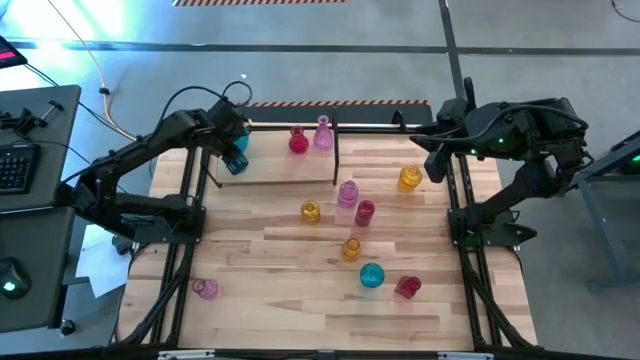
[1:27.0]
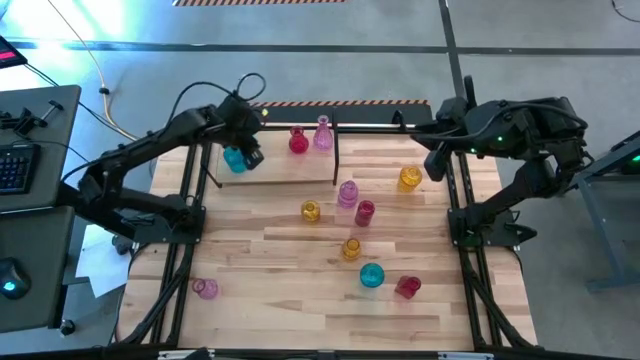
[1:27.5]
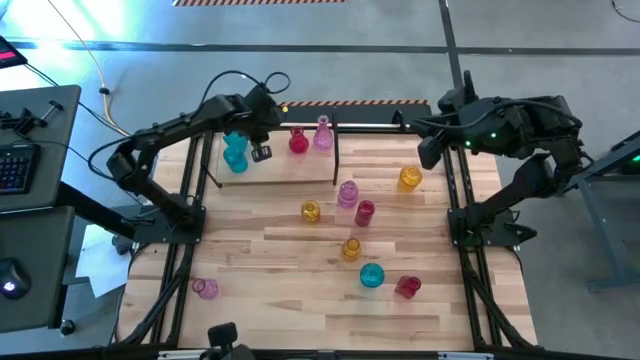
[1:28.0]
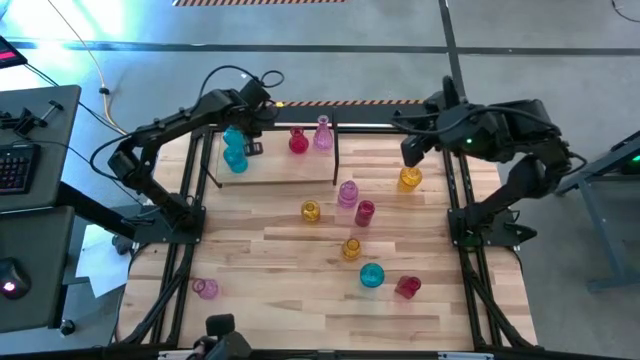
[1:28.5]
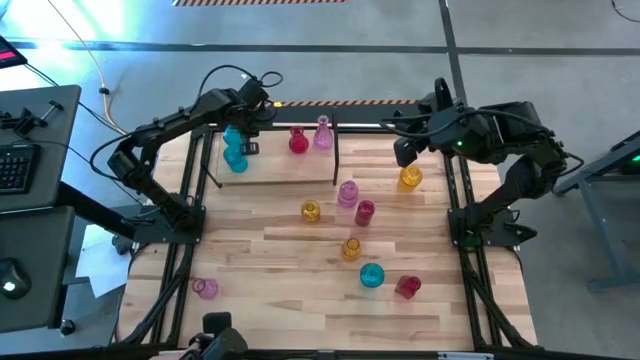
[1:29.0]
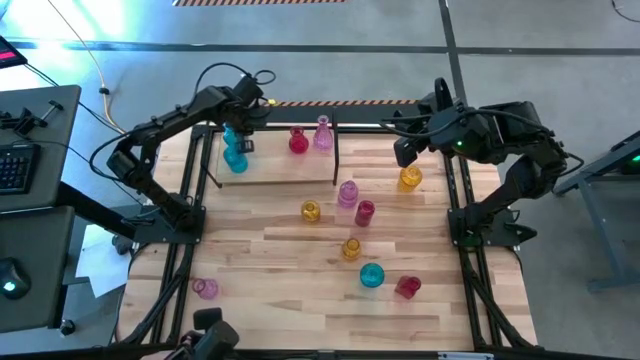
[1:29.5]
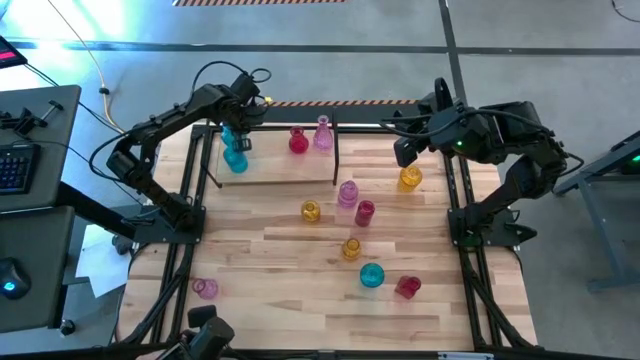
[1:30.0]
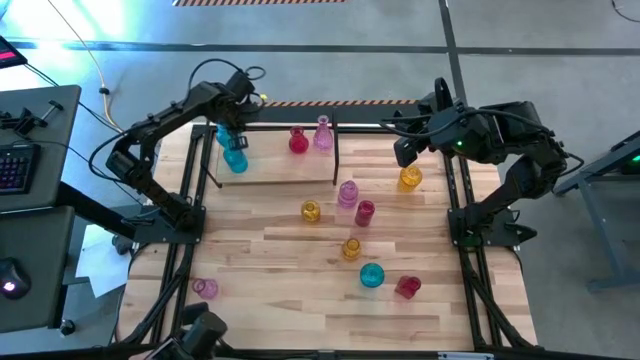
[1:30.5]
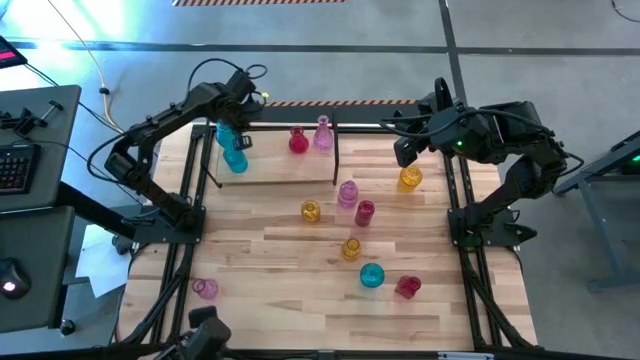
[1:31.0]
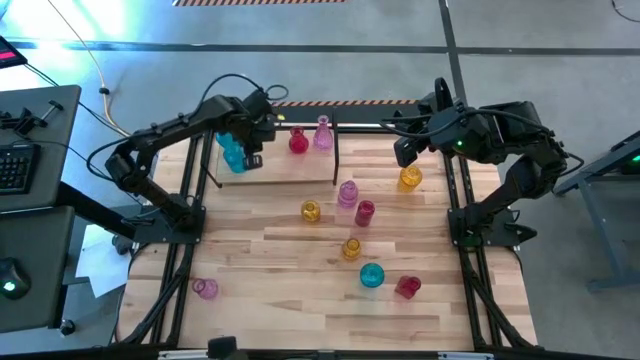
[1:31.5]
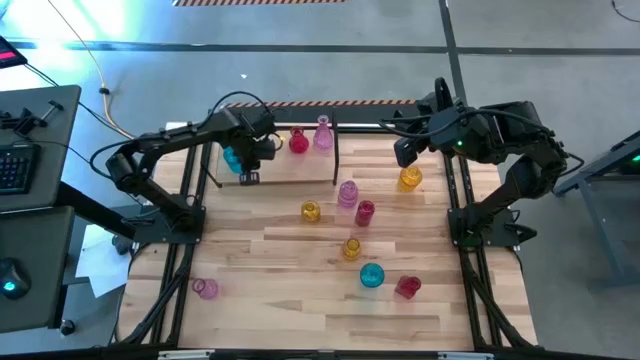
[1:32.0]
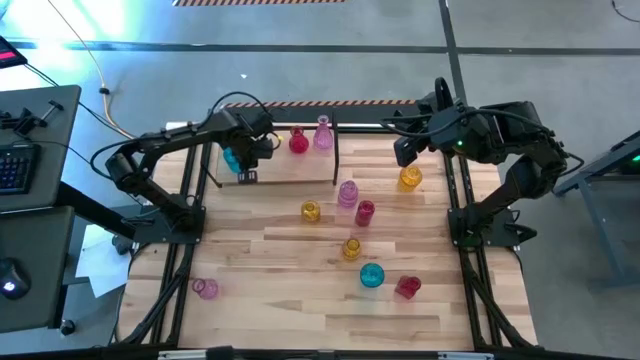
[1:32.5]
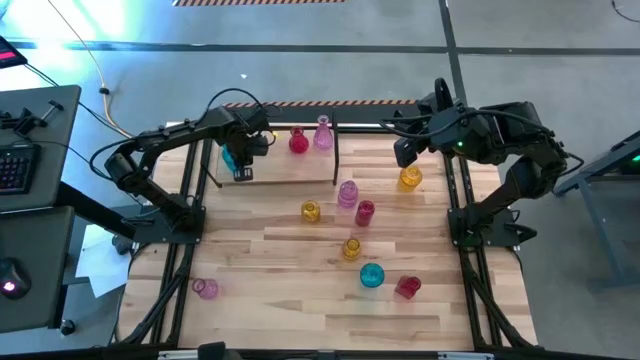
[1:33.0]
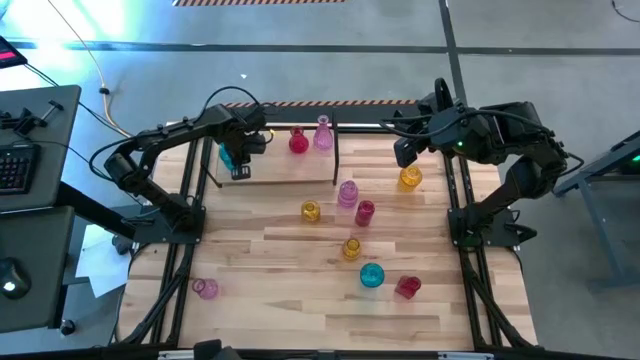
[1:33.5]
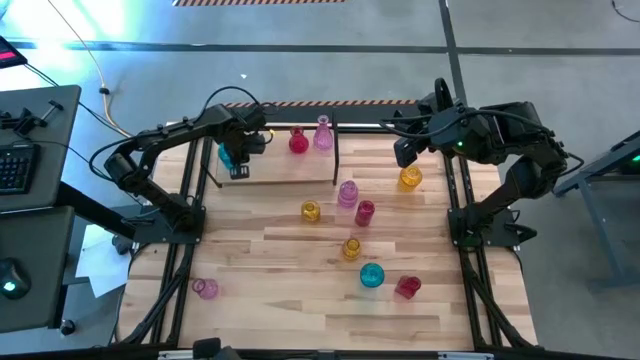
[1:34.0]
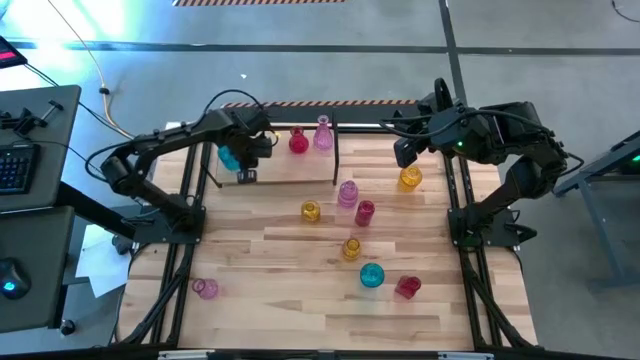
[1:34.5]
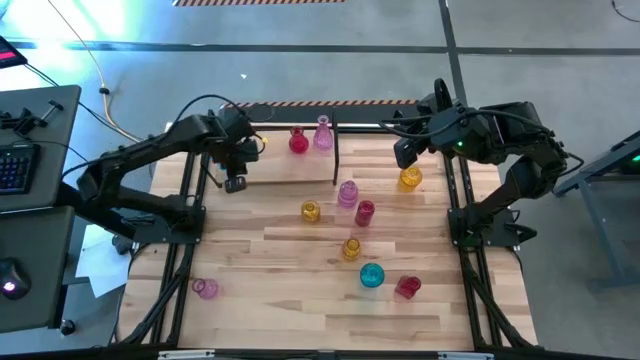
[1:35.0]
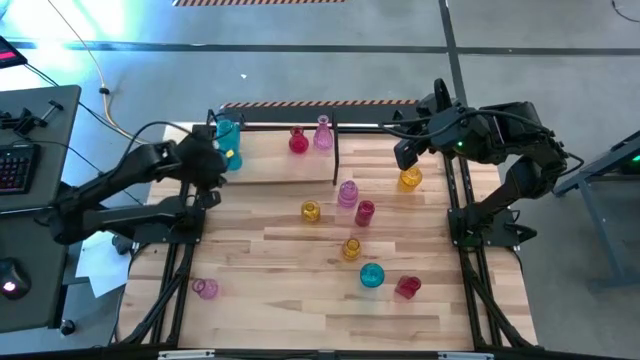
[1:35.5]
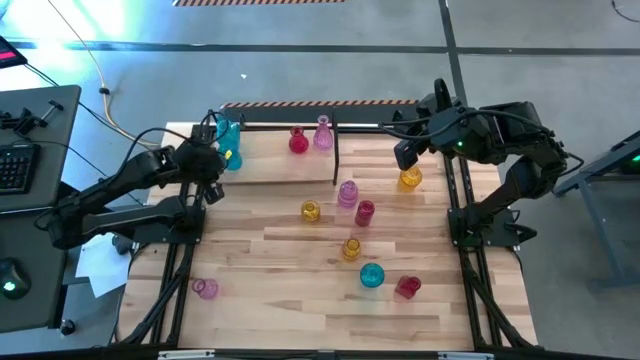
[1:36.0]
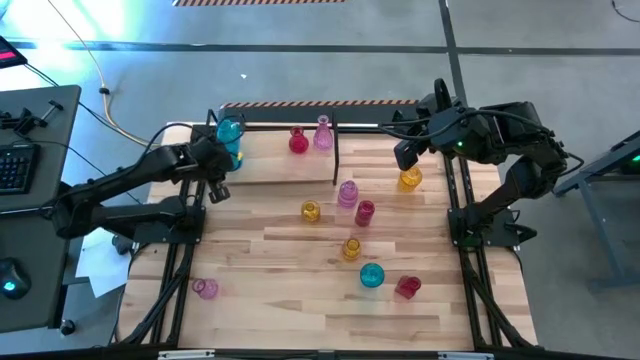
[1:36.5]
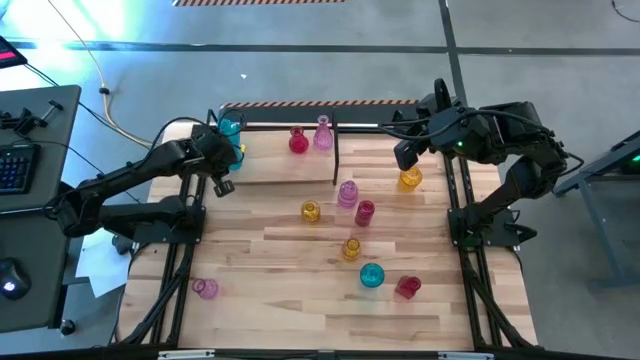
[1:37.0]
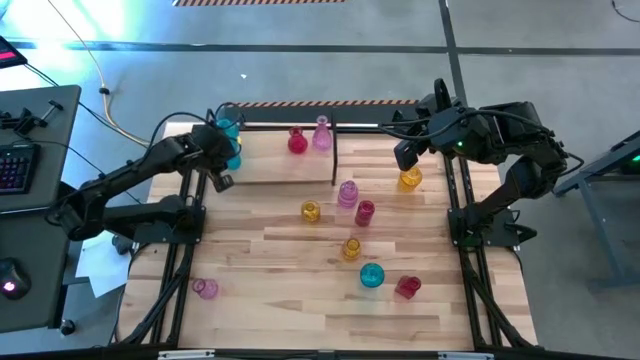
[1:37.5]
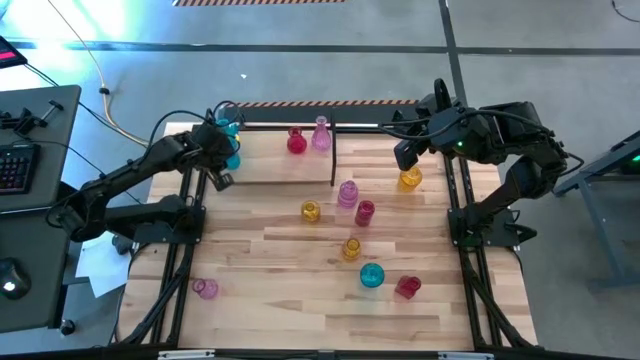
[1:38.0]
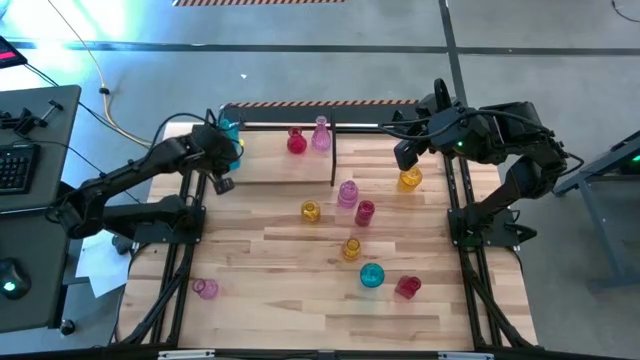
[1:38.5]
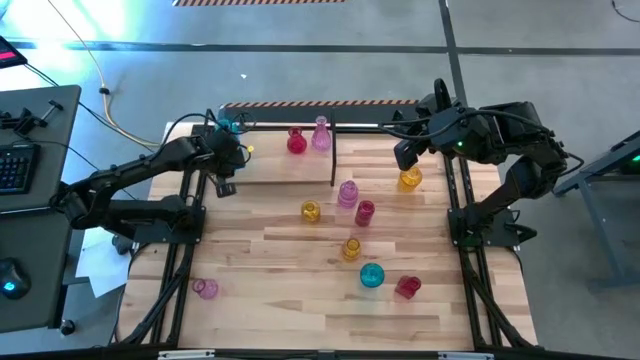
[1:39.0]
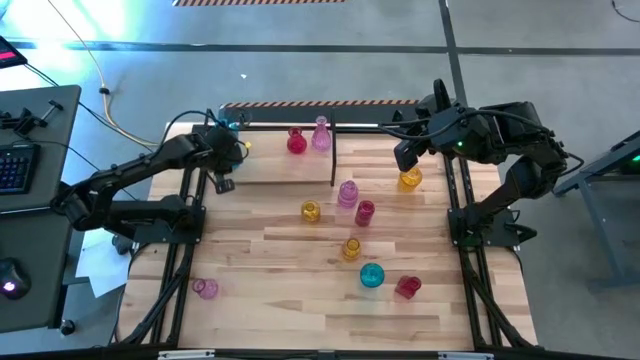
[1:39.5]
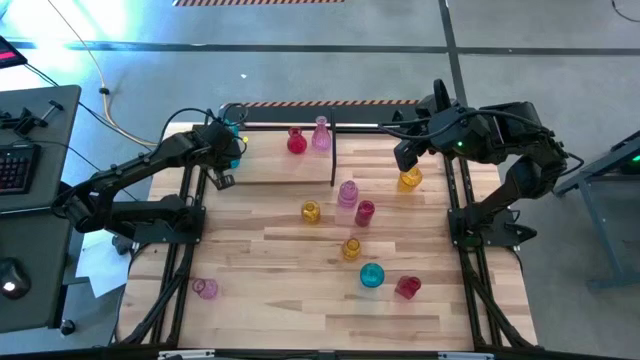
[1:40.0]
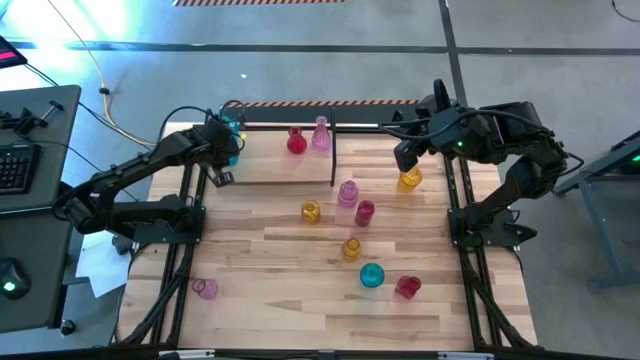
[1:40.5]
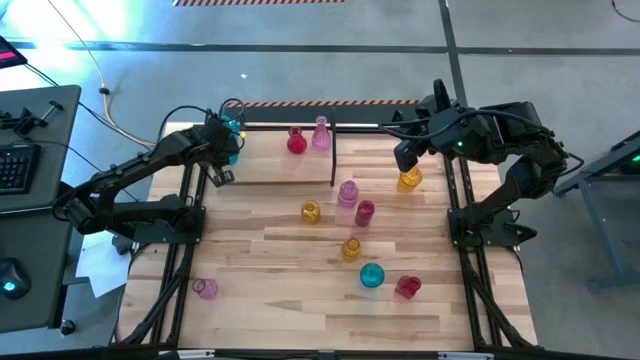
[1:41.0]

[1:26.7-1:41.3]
Task: sort vases onto shelf
Adjust the blue vases on the shelf

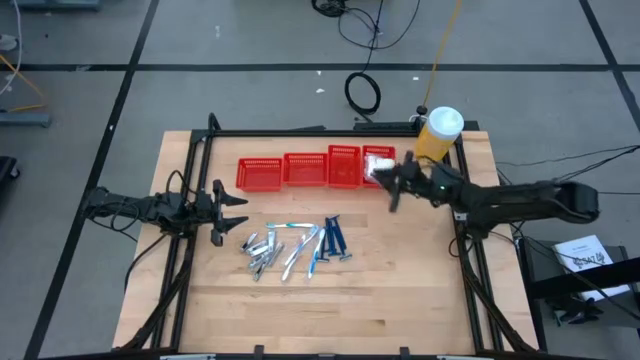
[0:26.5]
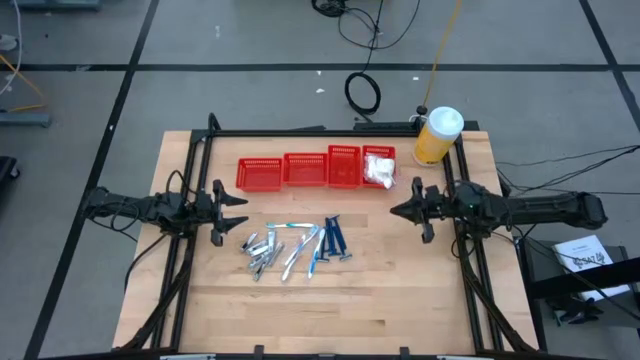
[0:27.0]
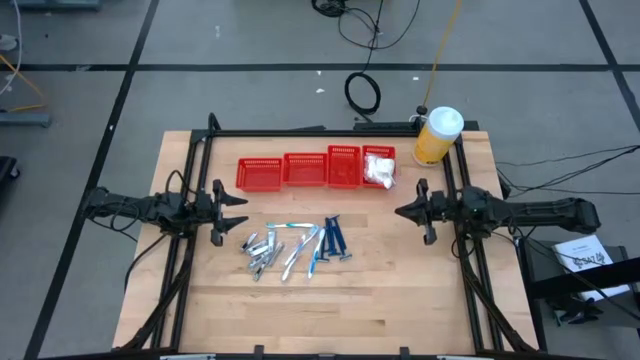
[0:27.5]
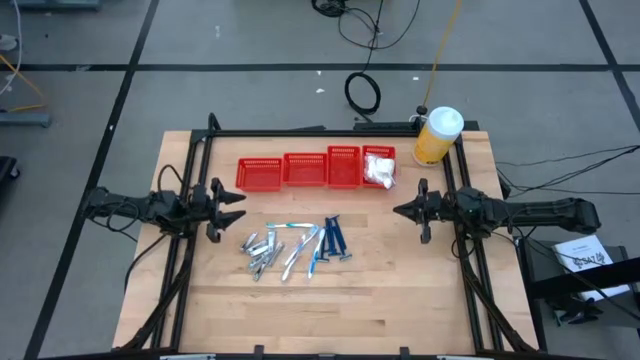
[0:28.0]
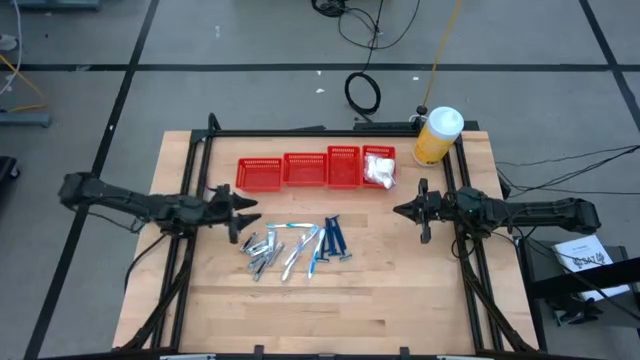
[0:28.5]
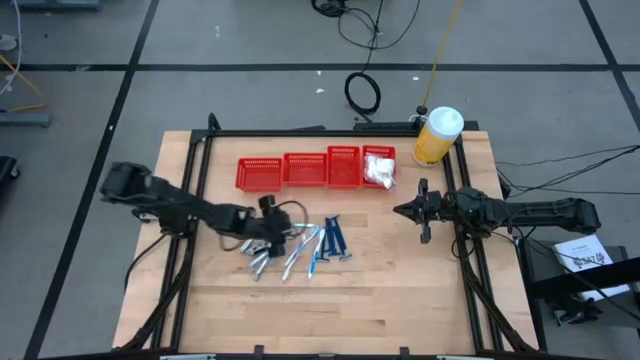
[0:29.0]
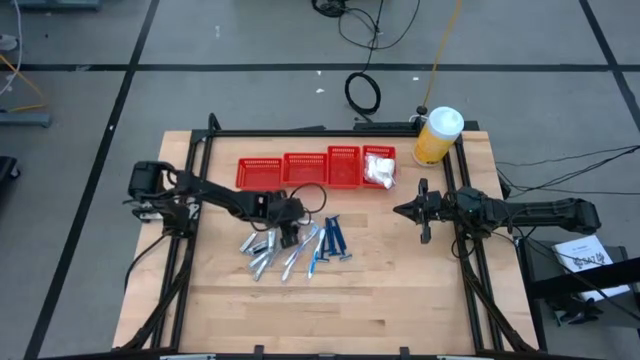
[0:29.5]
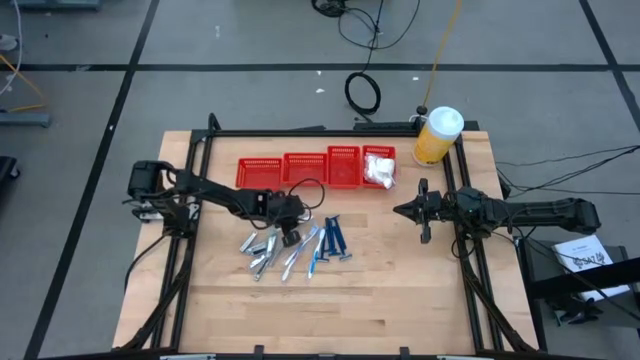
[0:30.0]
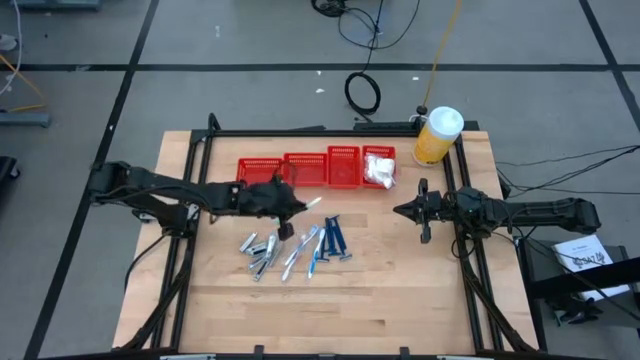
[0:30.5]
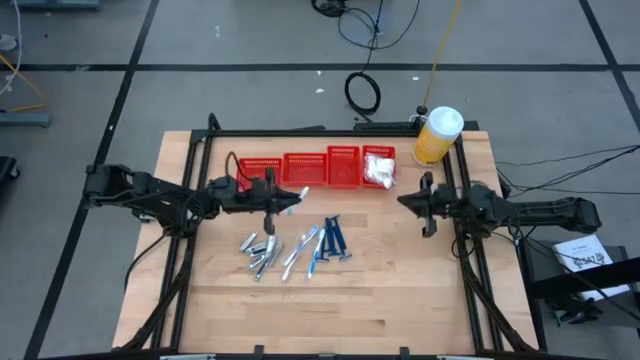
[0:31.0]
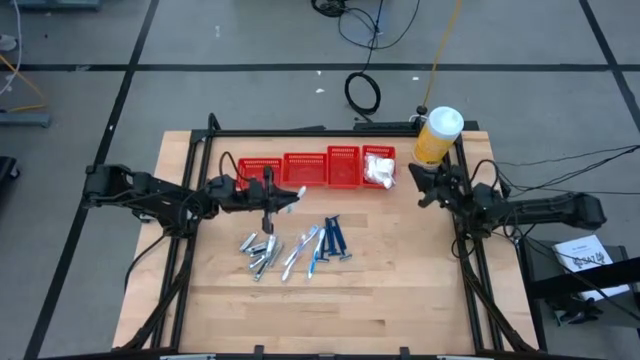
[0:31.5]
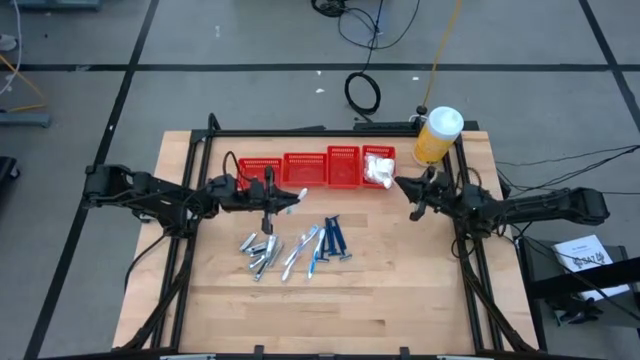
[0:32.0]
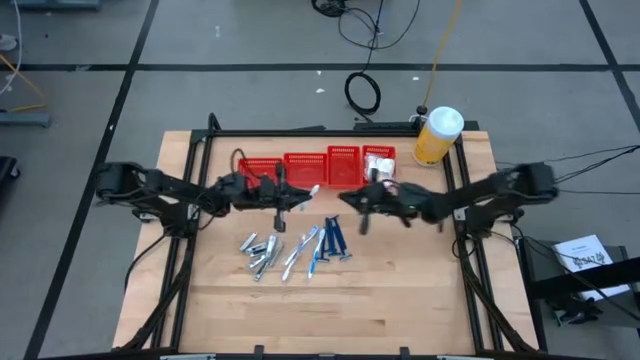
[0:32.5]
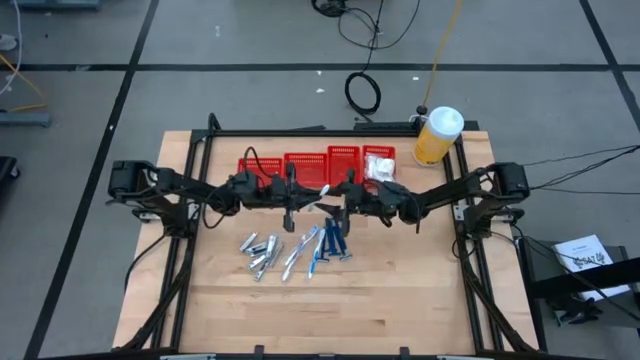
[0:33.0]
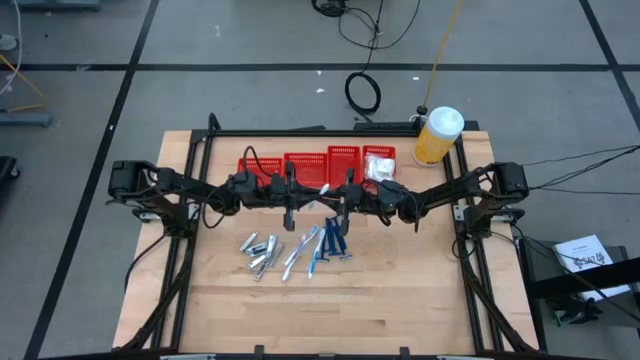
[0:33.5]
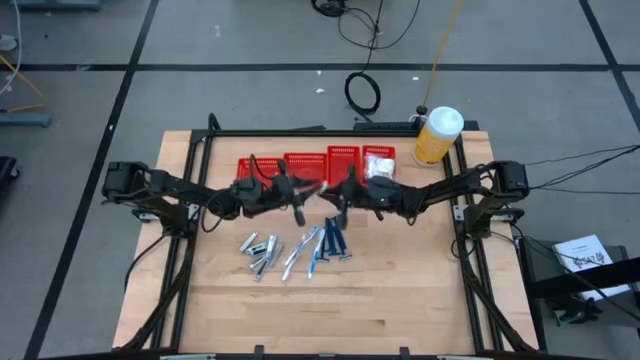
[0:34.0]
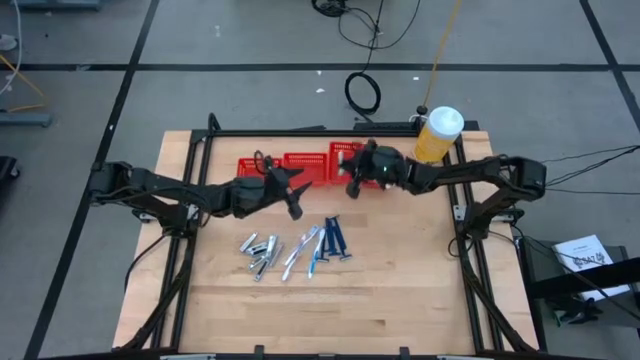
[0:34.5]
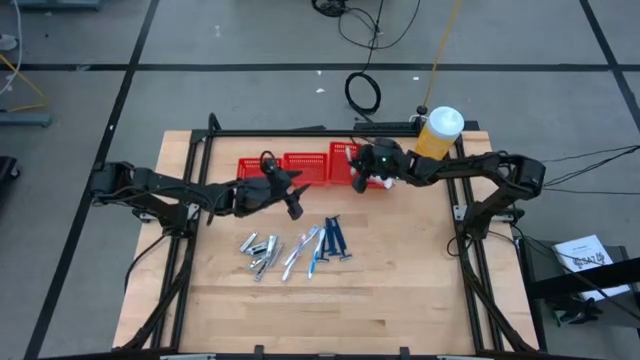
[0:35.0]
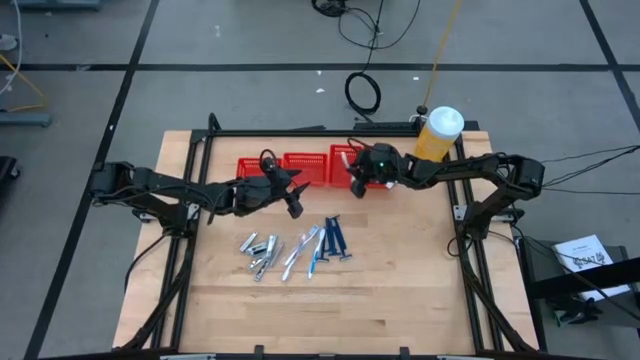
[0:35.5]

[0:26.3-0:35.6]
Task: Pick & Place Travel size toiletries
Put the light green toothbrush into the vertical left red bin
